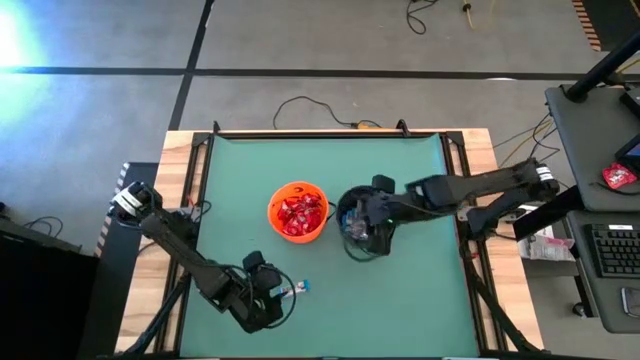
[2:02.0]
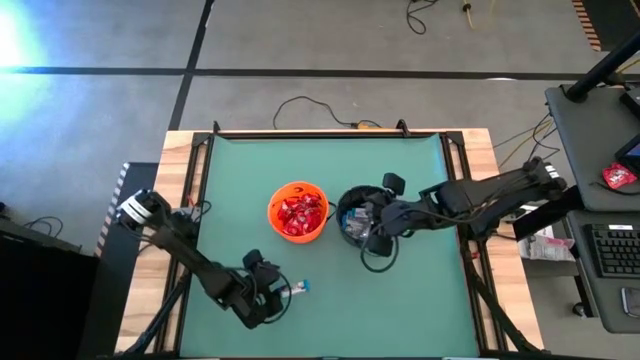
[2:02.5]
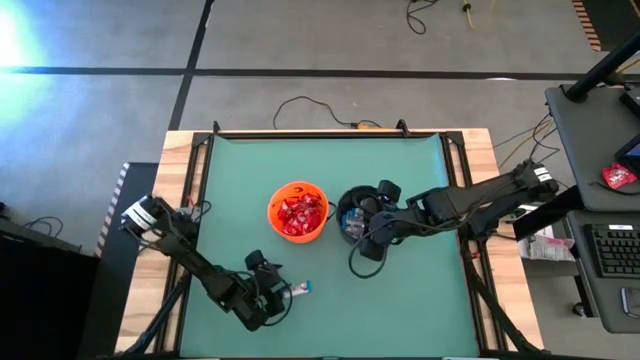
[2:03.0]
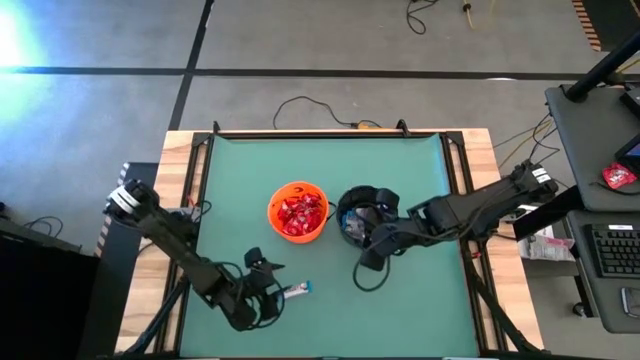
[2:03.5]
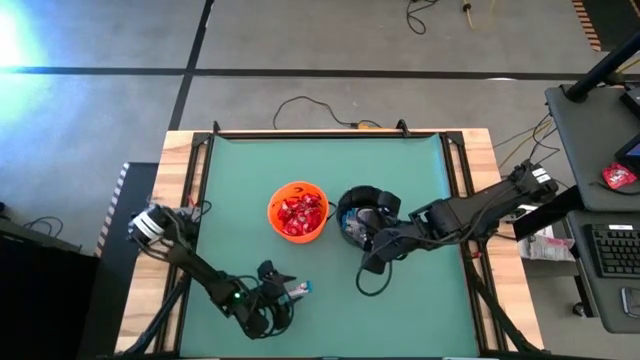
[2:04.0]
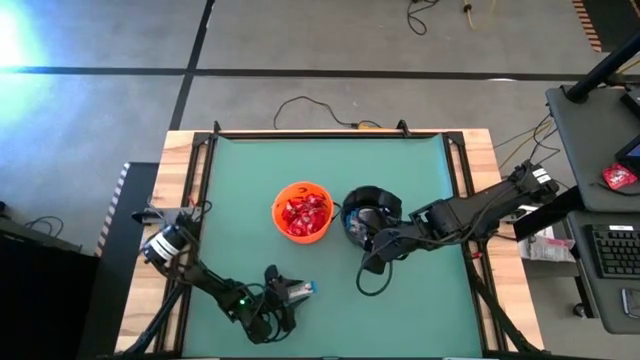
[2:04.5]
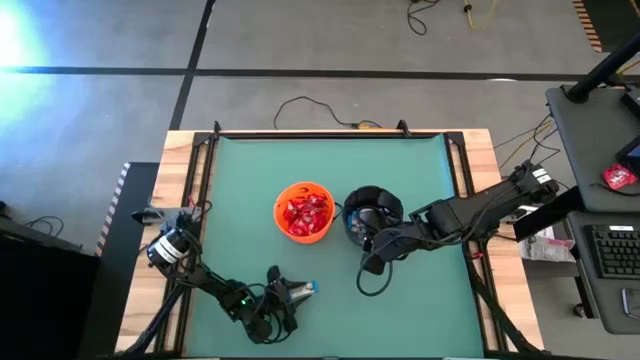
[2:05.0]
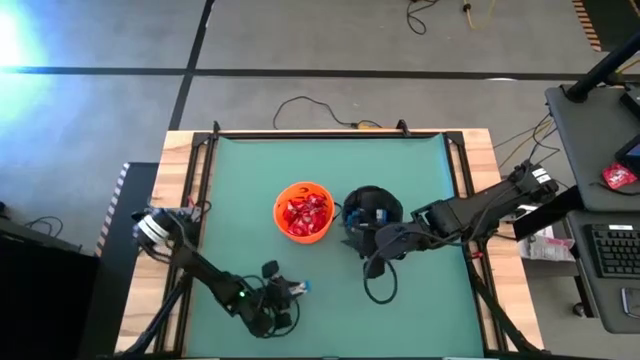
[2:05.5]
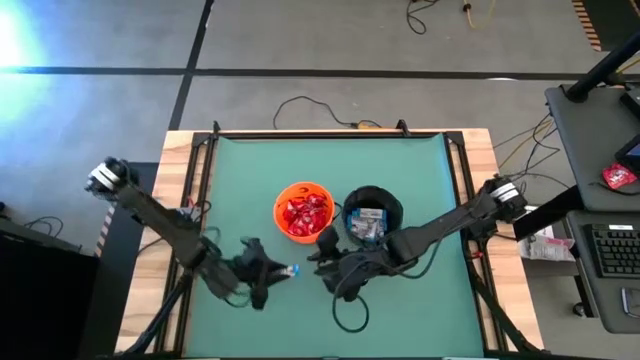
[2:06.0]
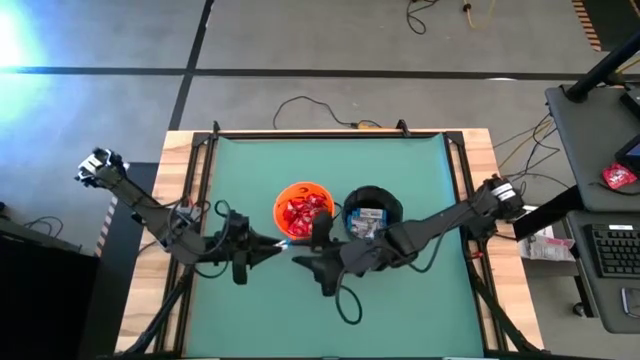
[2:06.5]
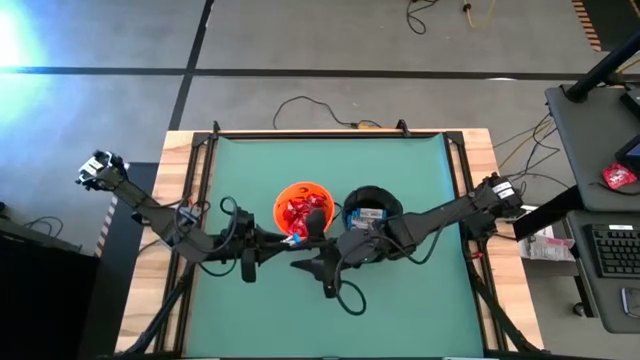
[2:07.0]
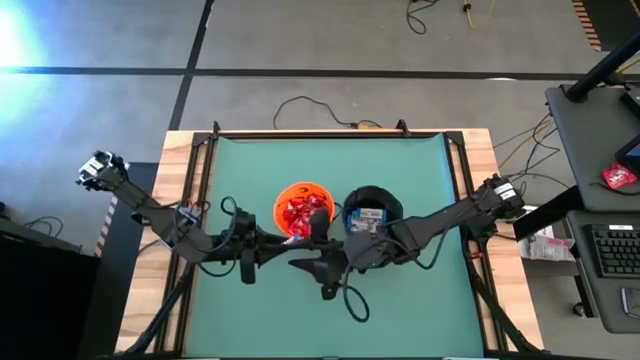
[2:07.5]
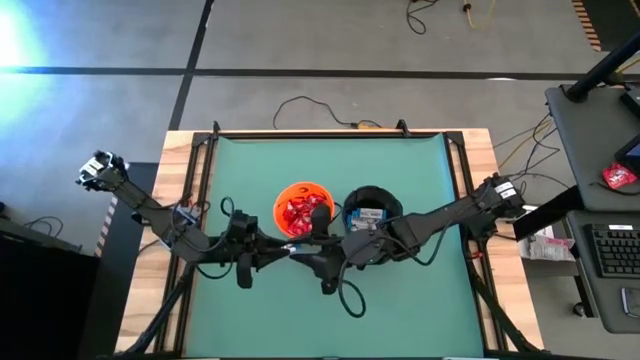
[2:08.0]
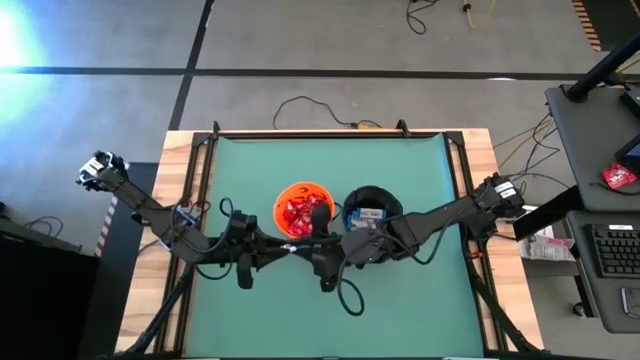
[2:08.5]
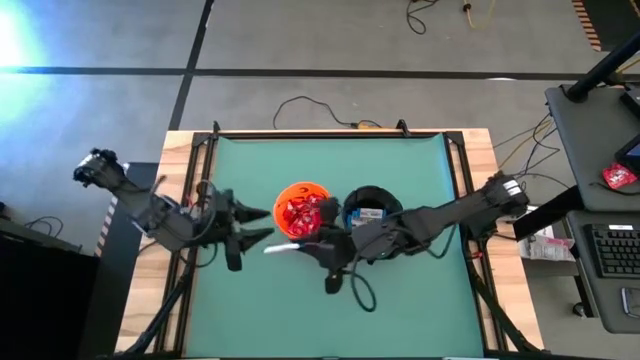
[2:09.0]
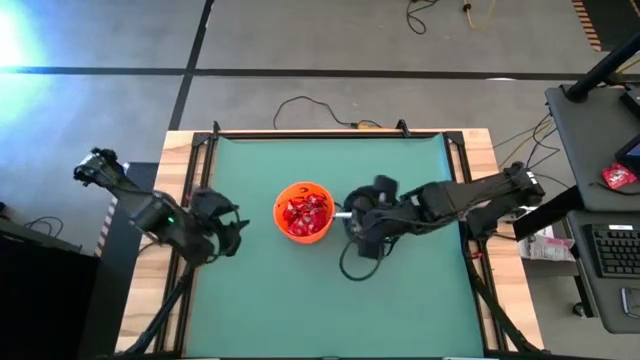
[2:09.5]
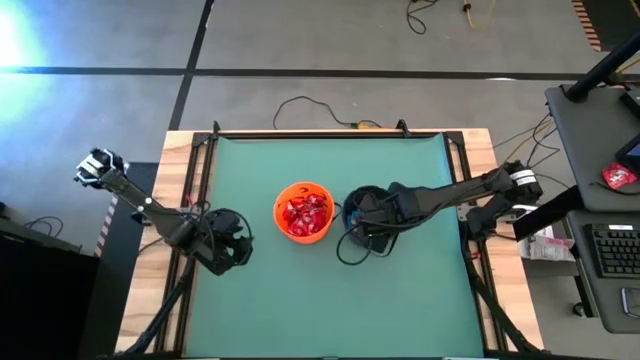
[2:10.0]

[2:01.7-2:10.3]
Task: Sort candy by brand, put in halloween buckets
Put the white chocolate into the black bucket

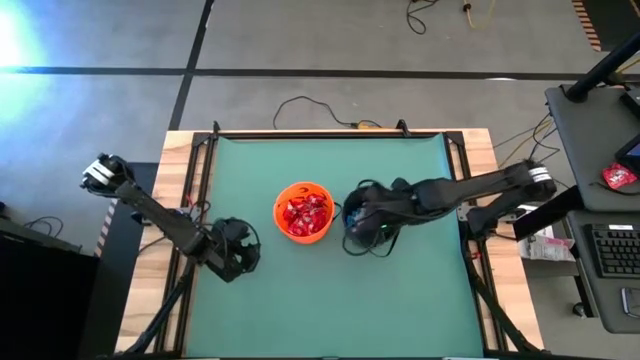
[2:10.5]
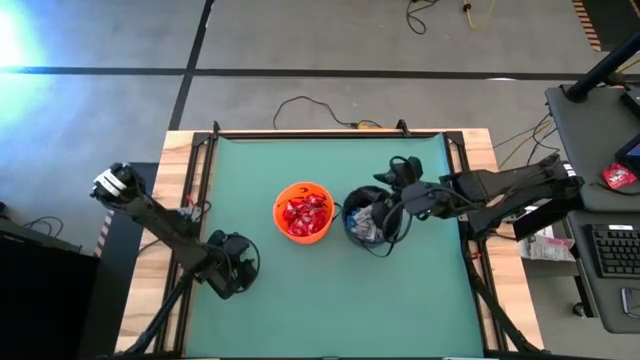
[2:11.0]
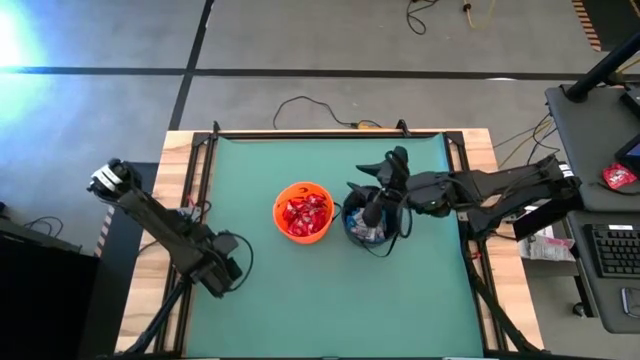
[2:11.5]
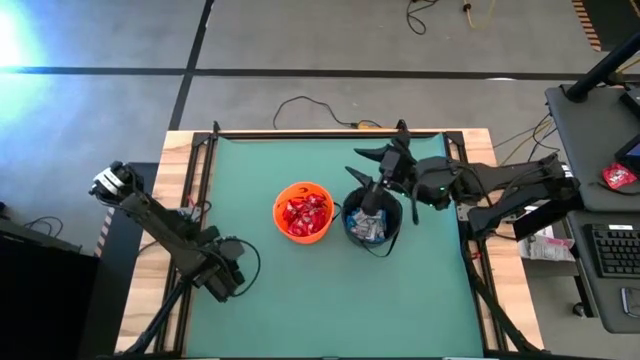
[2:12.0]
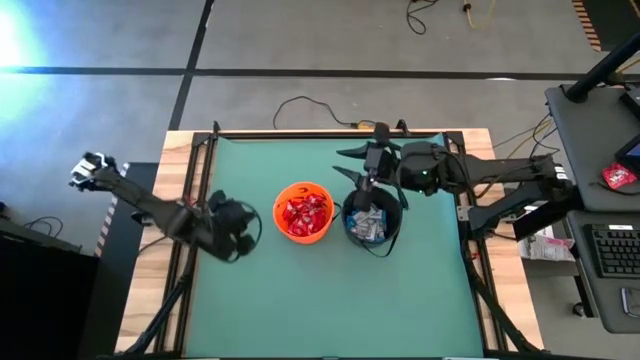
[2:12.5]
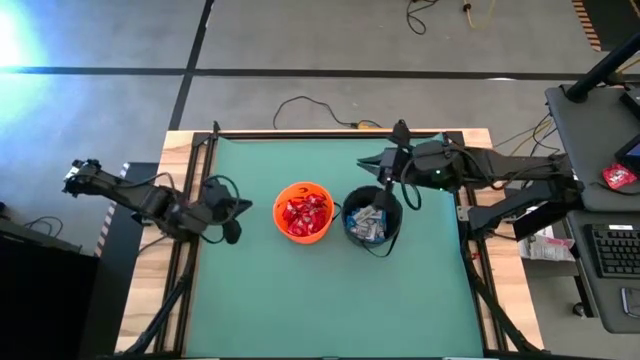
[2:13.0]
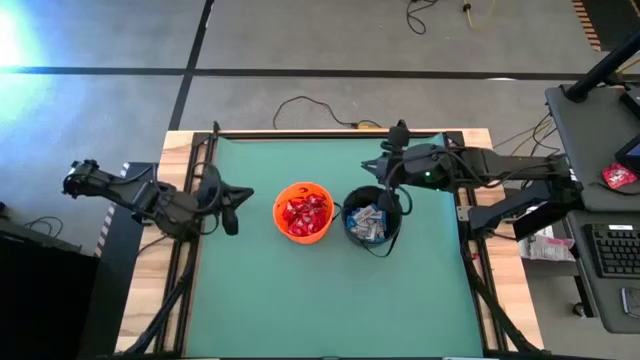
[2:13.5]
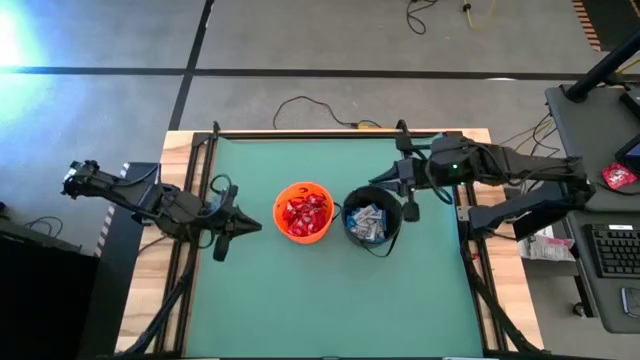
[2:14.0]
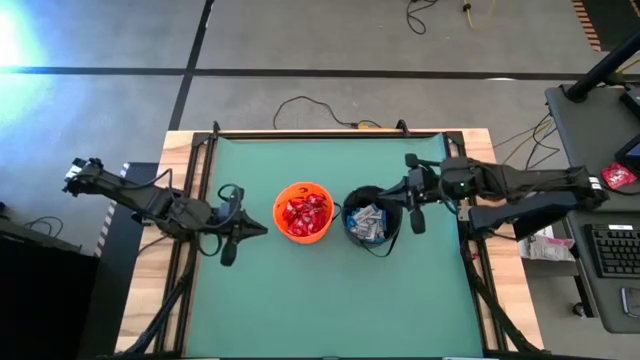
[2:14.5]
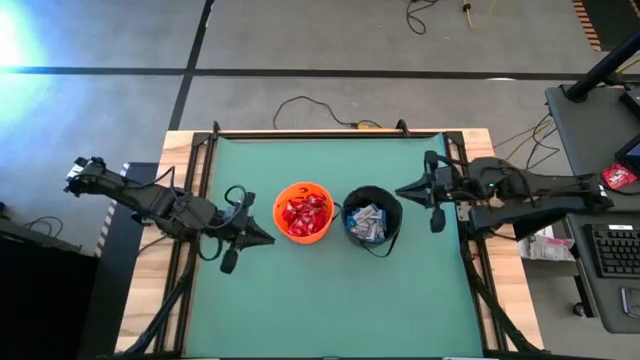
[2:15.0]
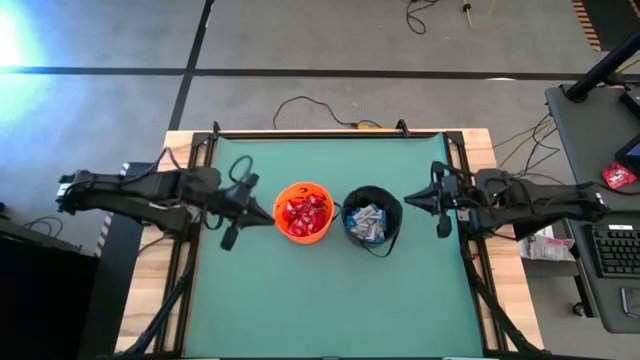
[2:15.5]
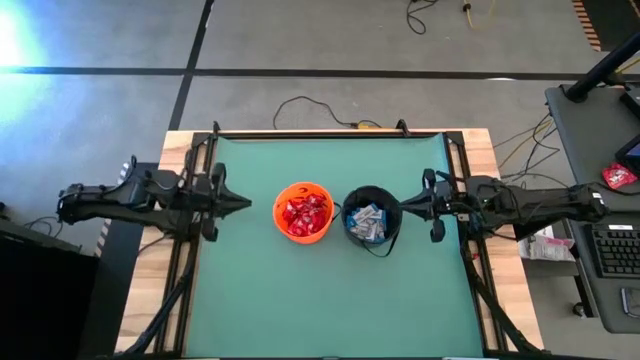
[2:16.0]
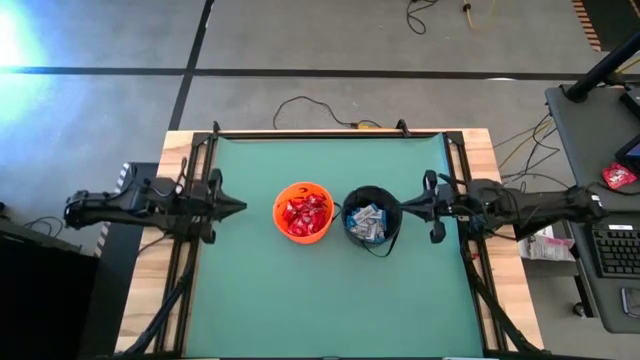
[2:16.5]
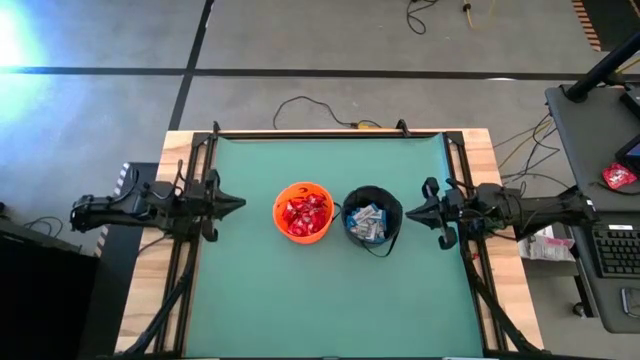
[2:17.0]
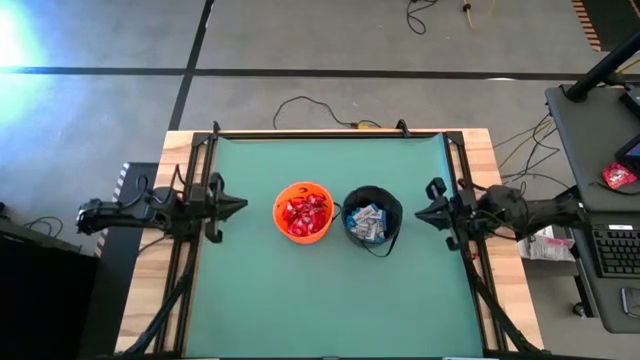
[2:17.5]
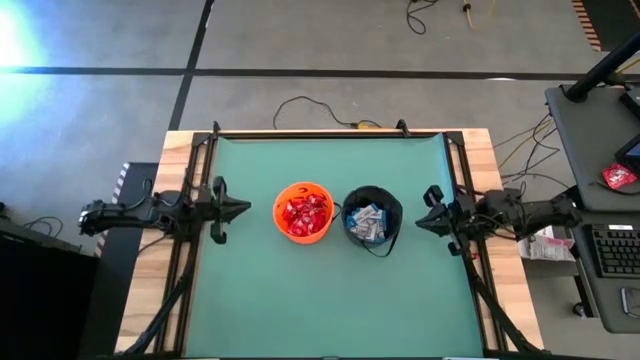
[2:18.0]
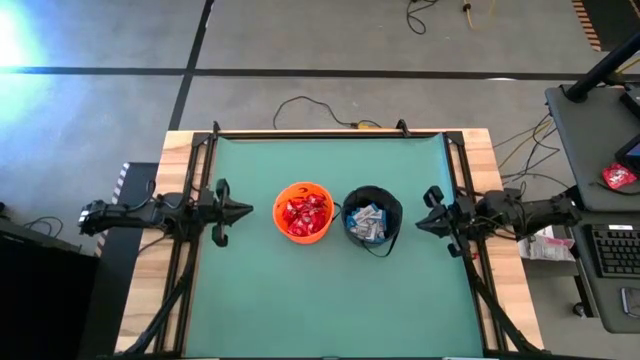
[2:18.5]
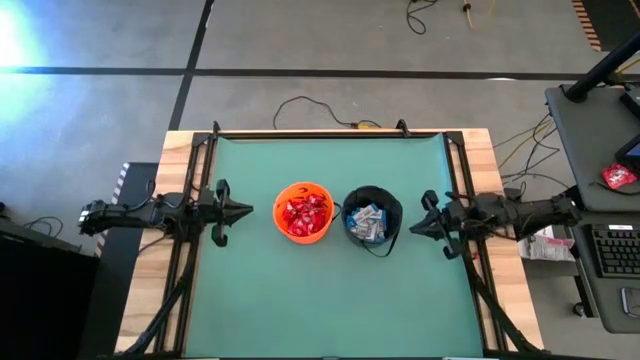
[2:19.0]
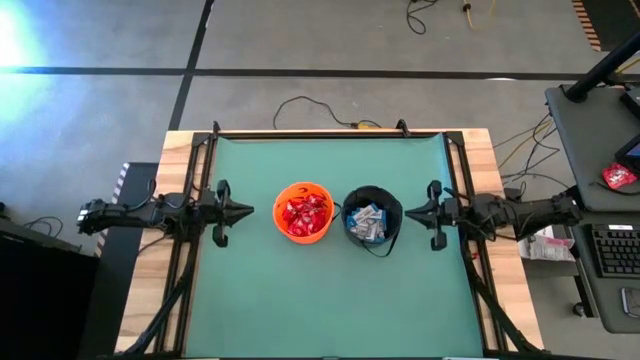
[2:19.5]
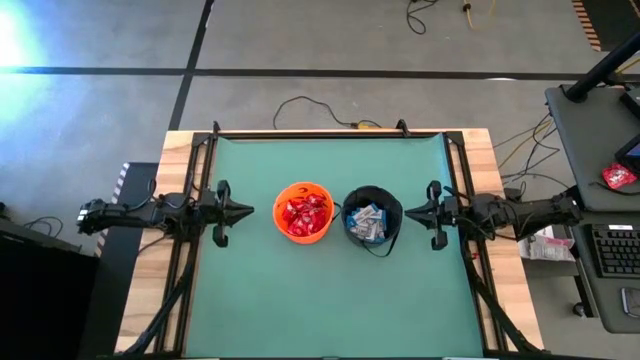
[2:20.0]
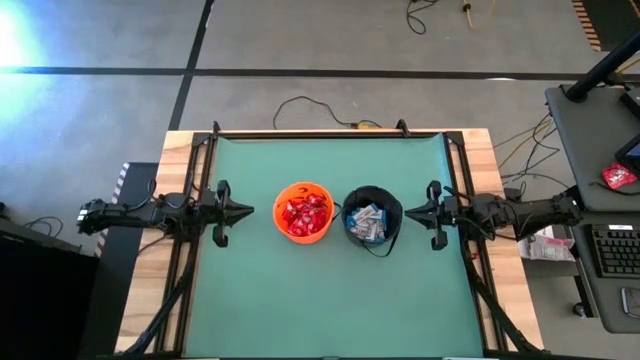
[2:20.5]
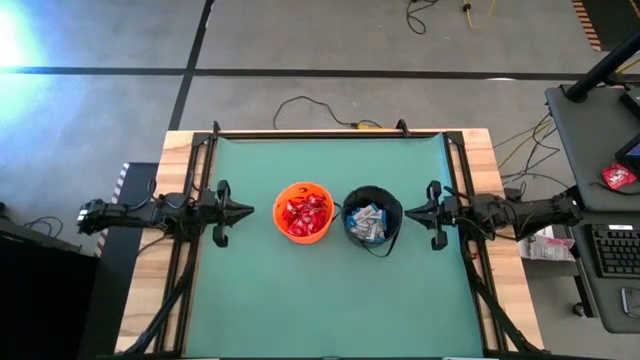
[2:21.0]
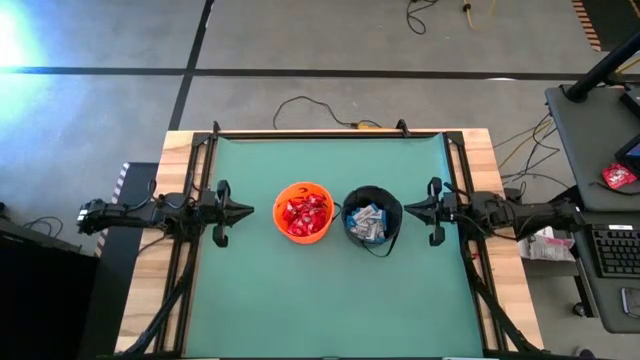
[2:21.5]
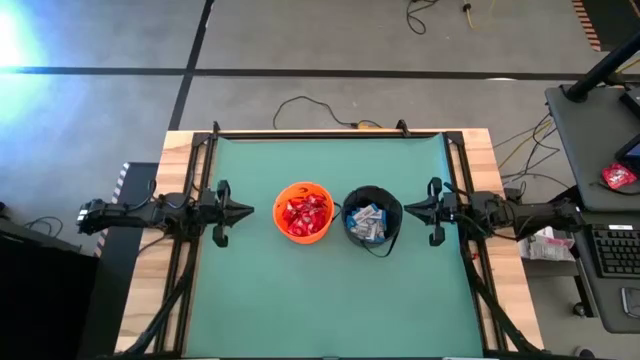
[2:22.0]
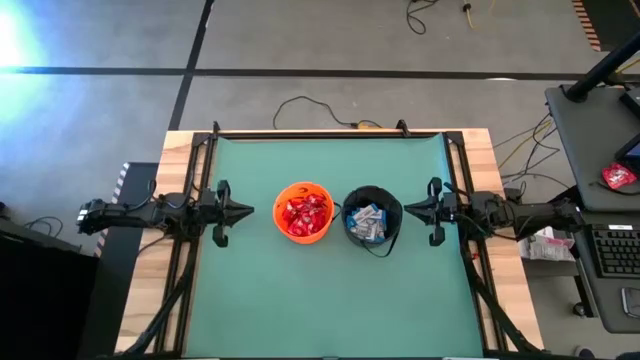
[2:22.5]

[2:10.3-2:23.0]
Return to Home Position

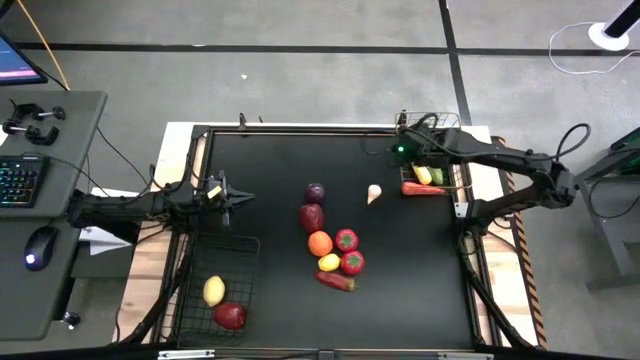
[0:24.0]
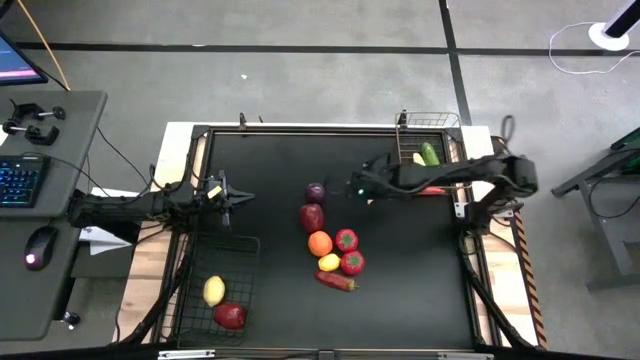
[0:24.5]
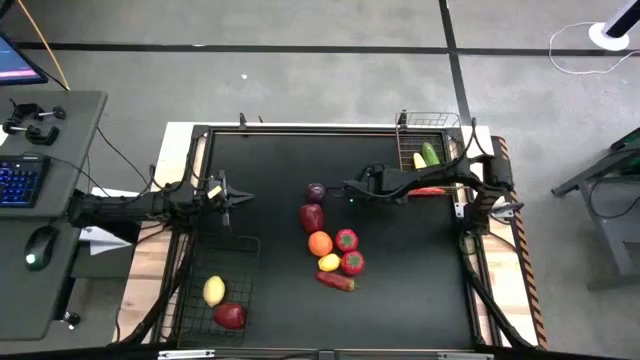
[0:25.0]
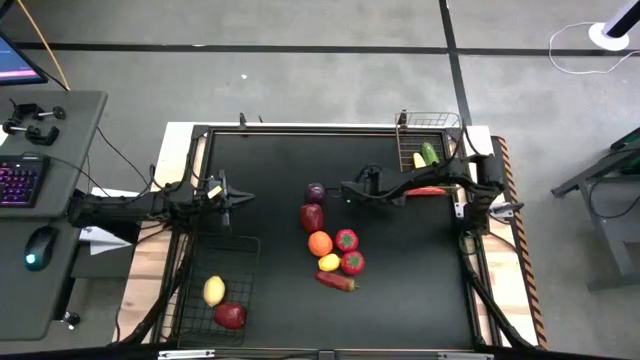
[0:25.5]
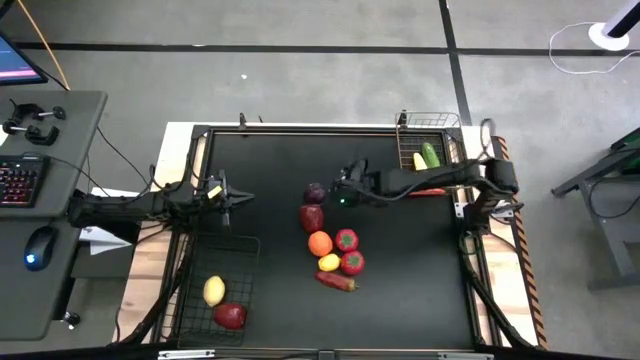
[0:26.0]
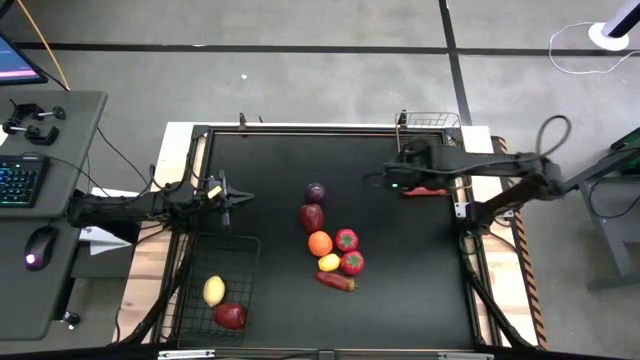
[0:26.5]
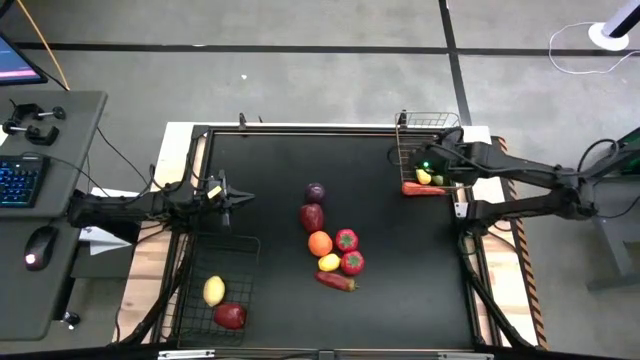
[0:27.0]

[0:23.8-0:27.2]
Task: Sort produce into baskets
Put the garlic into the right wire basket
